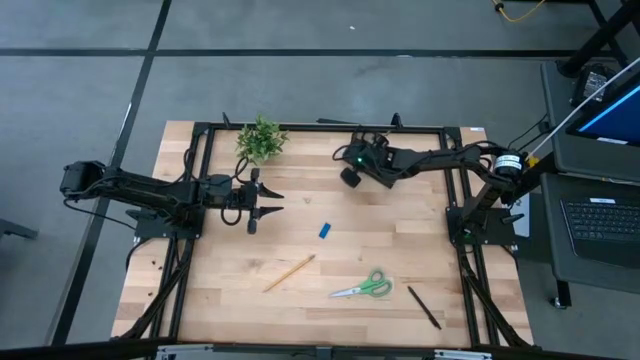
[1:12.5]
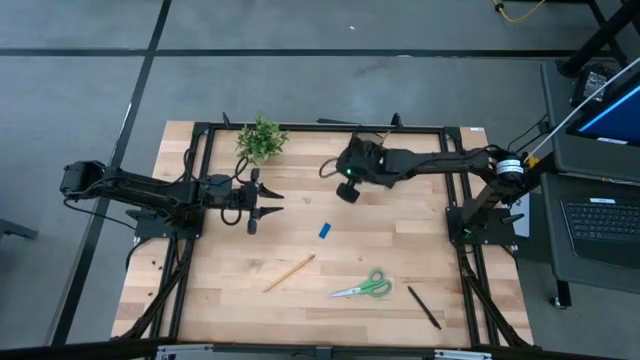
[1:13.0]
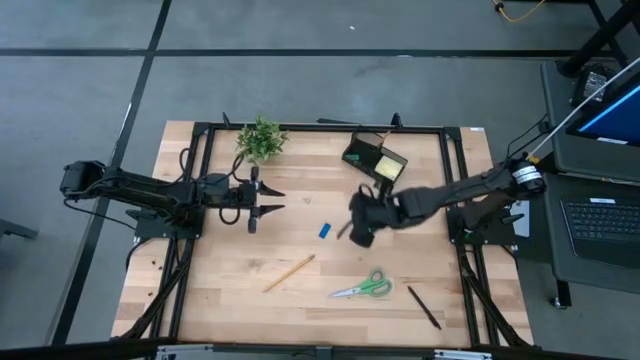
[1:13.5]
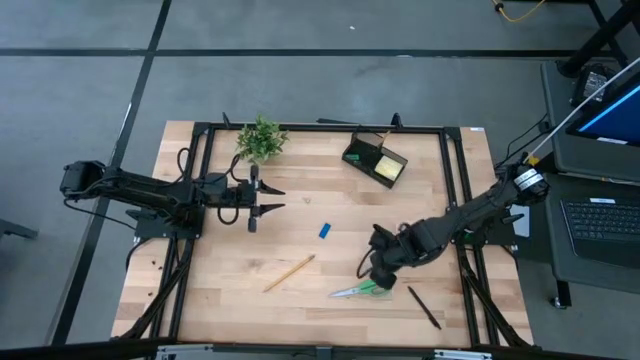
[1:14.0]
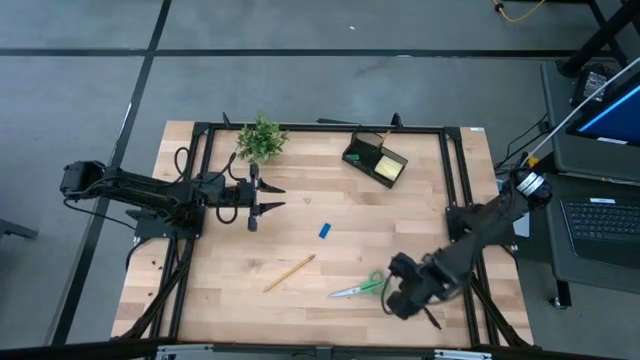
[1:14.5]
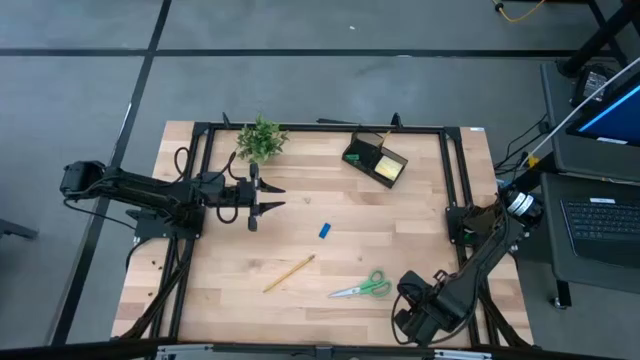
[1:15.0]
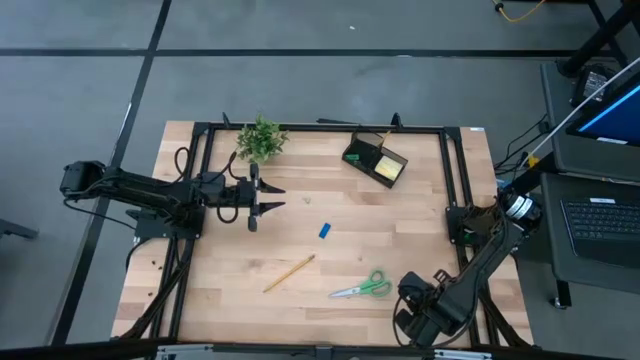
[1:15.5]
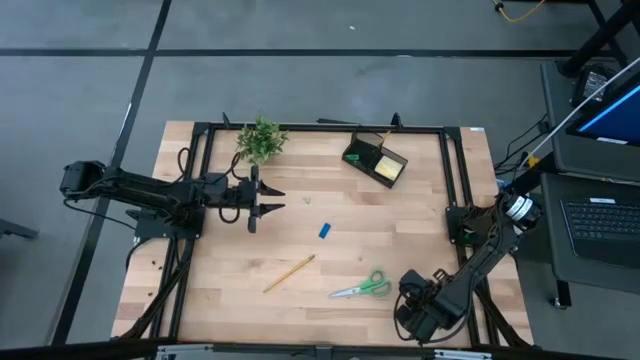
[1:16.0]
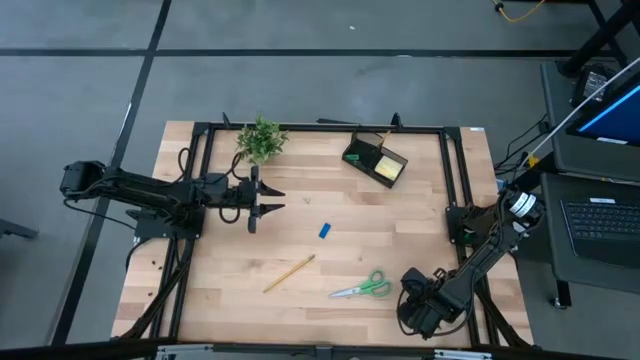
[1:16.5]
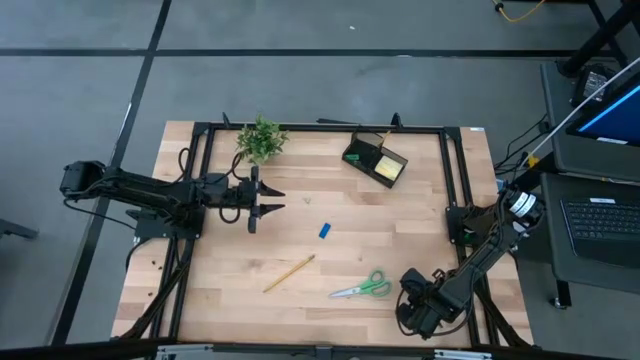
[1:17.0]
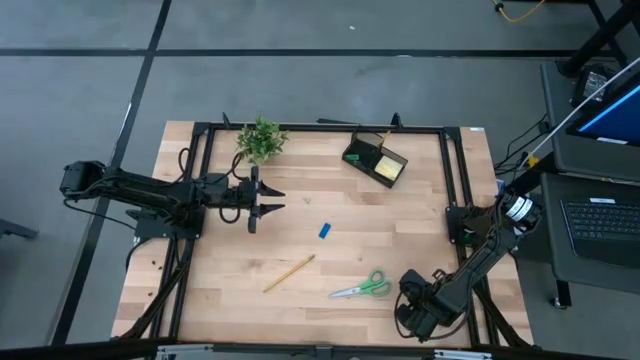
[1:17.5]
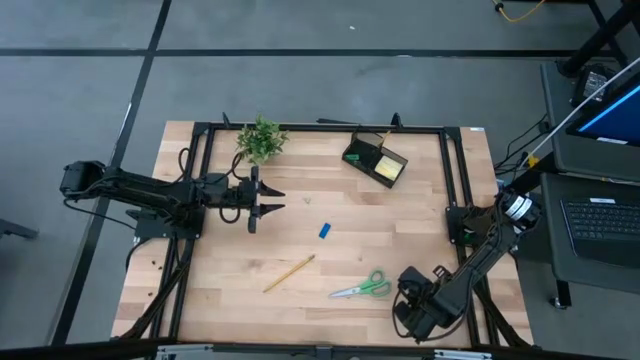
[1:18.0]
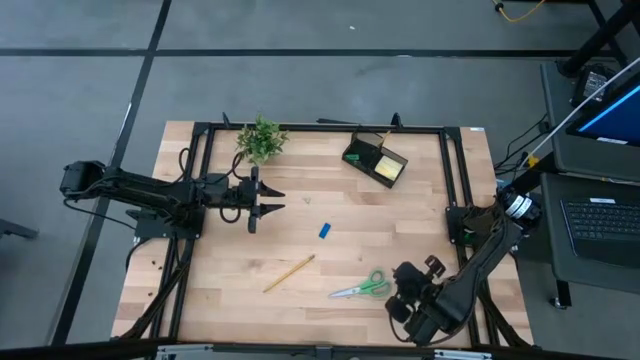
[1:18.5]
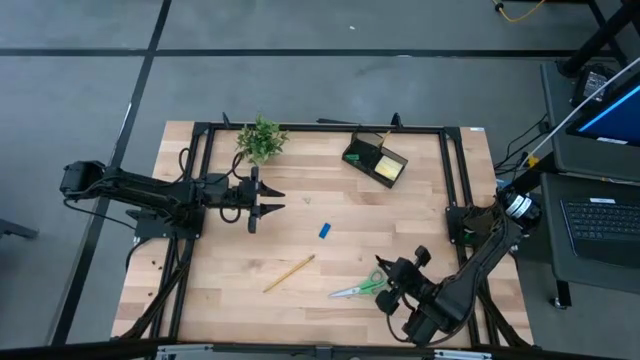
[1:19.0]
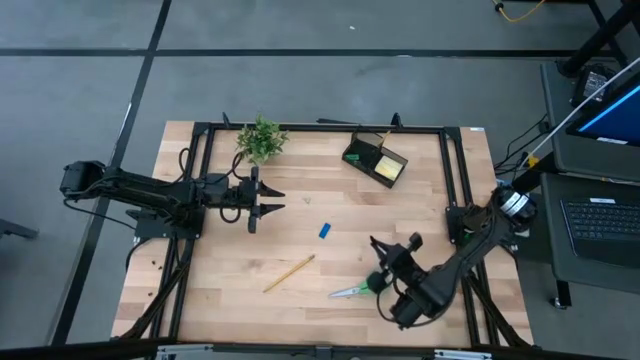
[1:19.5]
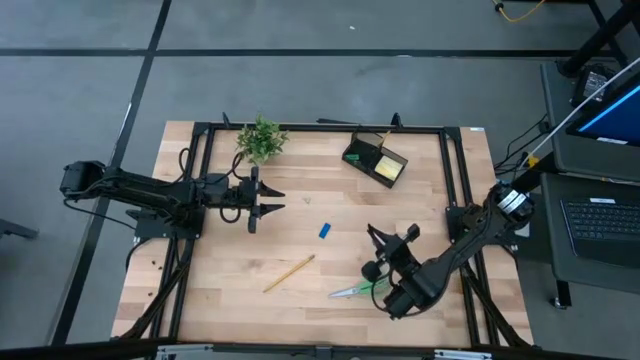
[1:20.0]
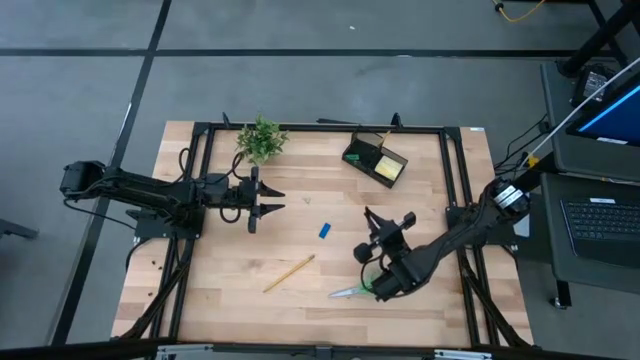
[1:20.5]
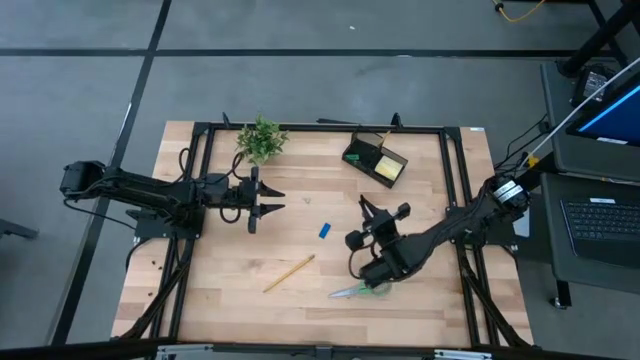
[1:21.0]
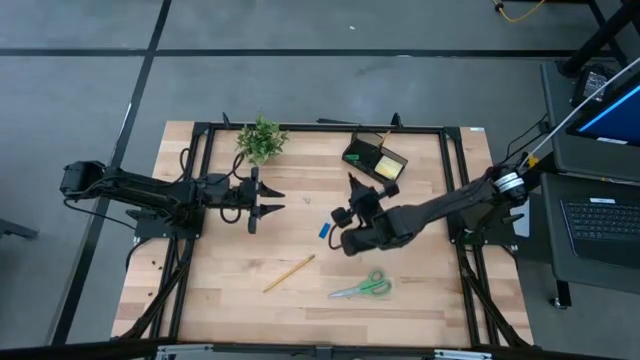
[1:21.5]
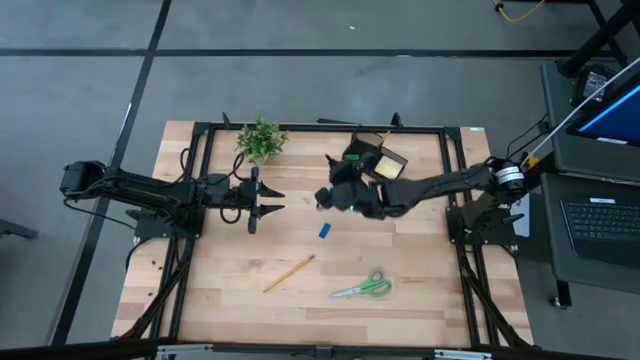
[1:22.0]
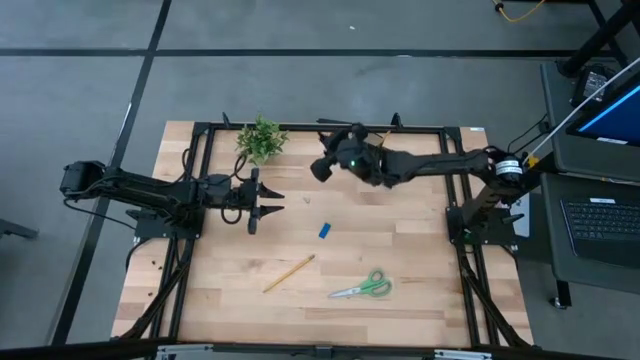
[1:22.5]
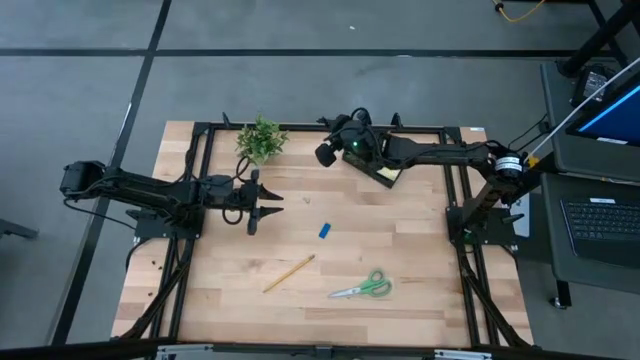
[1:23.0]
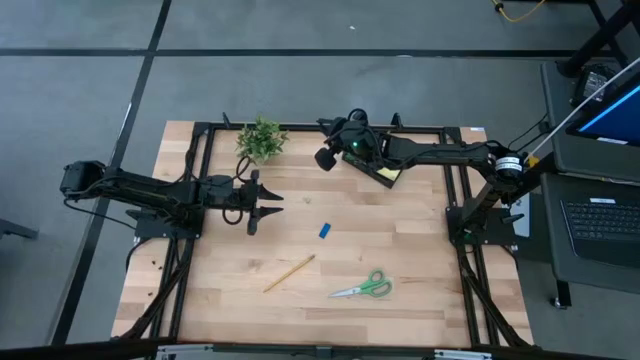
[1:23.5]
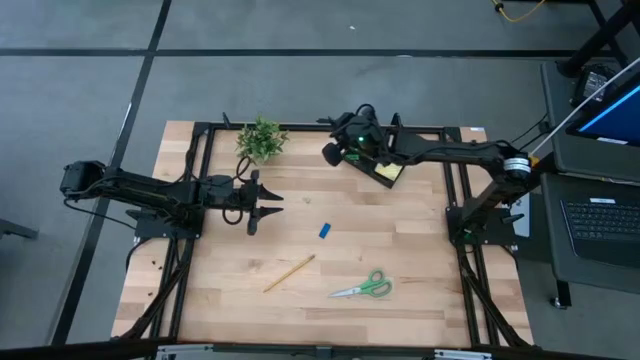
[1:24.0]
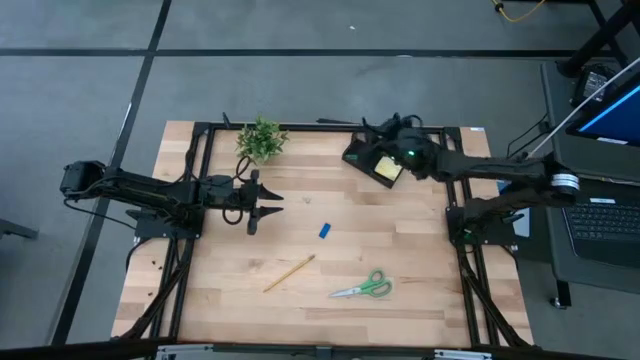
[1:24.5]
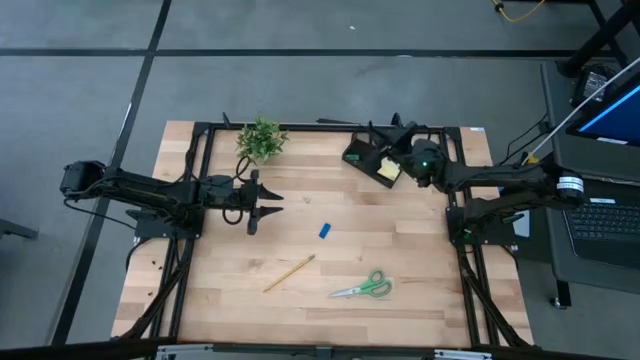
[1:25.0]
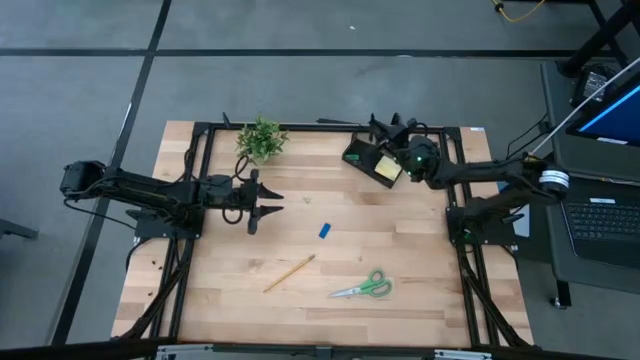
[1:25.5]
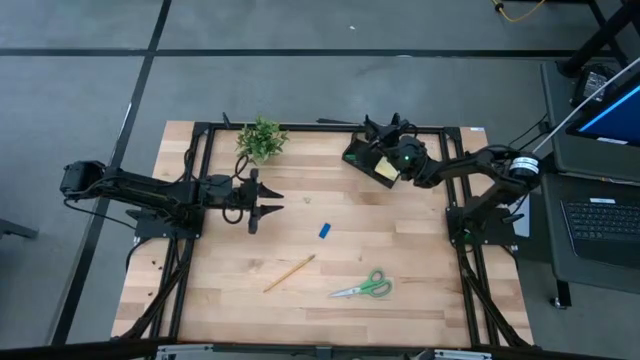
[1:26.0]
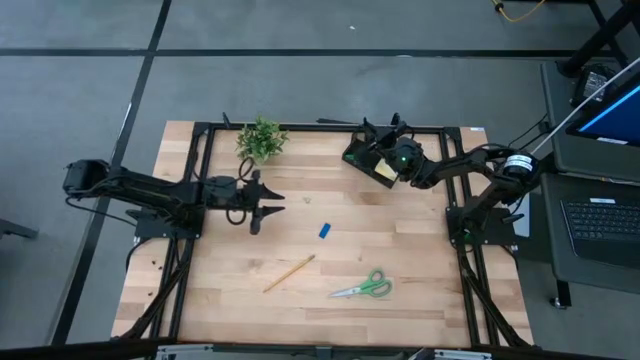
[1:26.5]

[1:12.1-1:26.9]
Task: Pick and place office supplies into organizer
Put the black pen into the black desk organizer

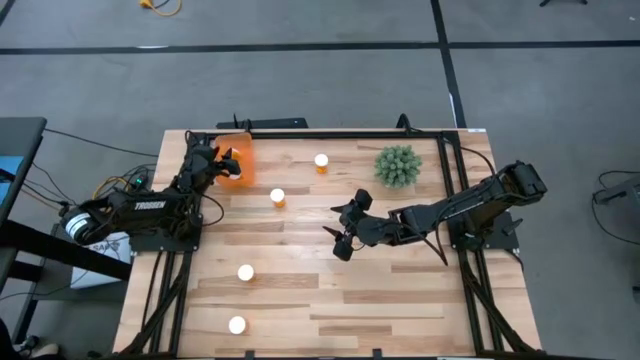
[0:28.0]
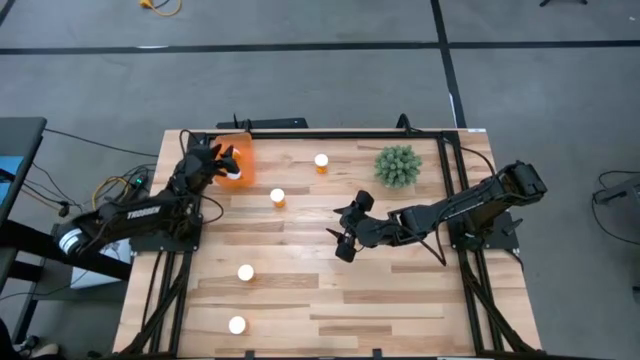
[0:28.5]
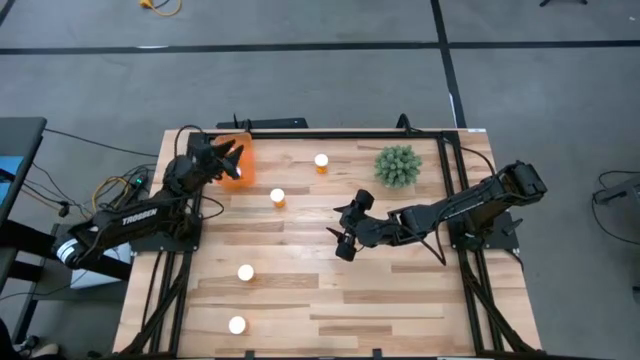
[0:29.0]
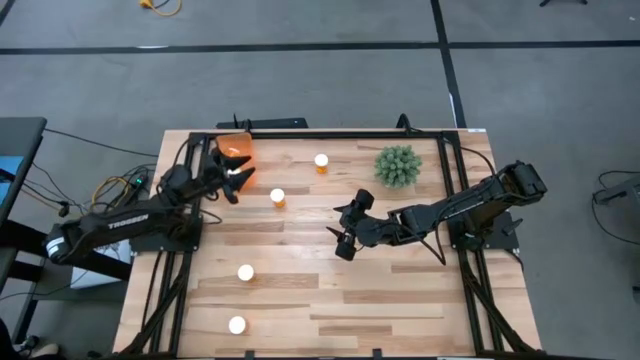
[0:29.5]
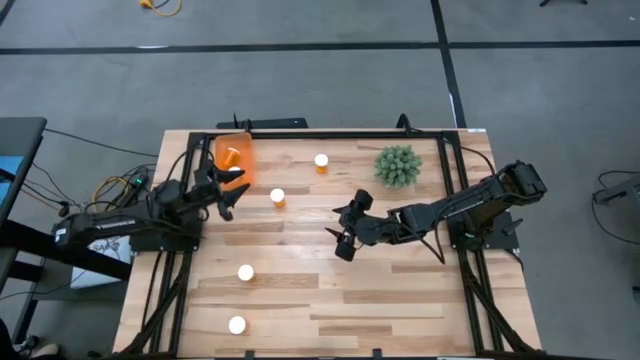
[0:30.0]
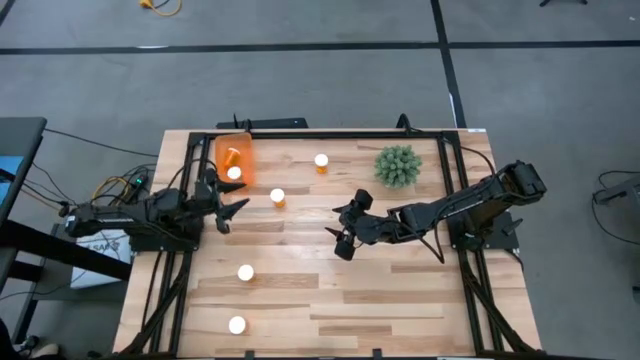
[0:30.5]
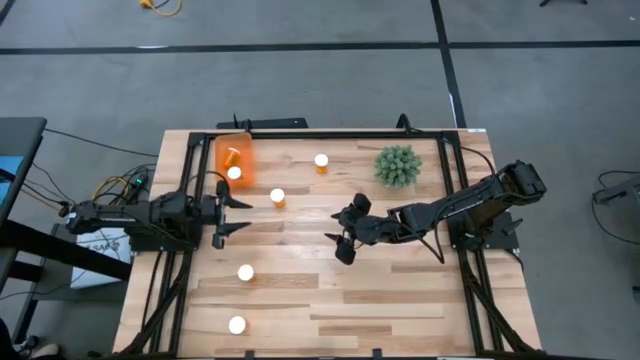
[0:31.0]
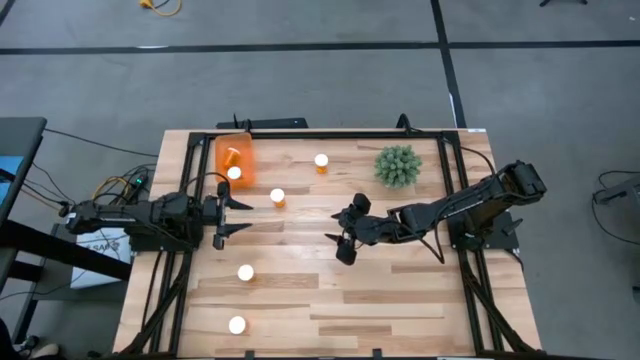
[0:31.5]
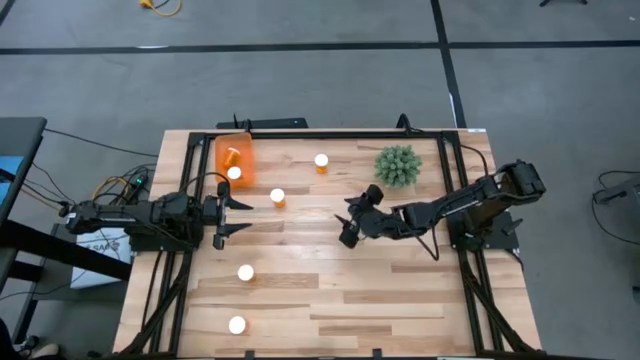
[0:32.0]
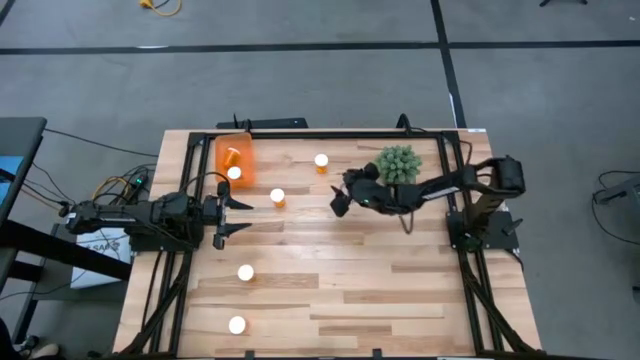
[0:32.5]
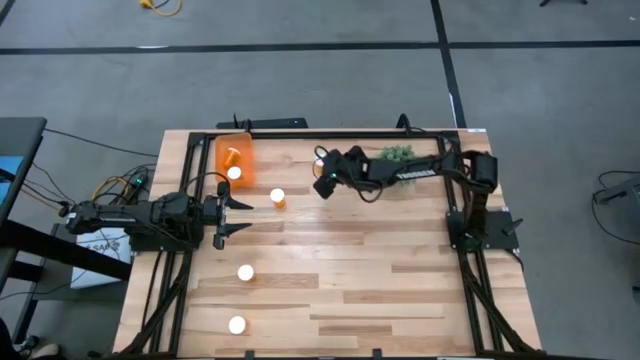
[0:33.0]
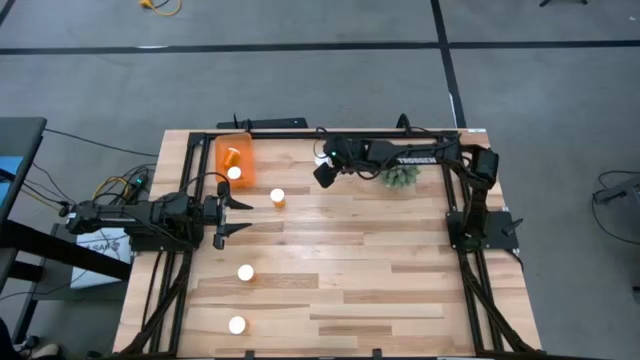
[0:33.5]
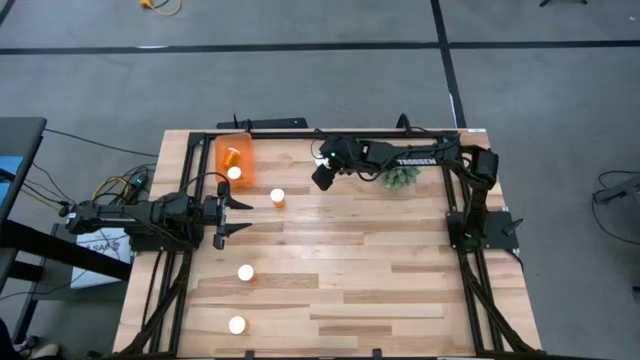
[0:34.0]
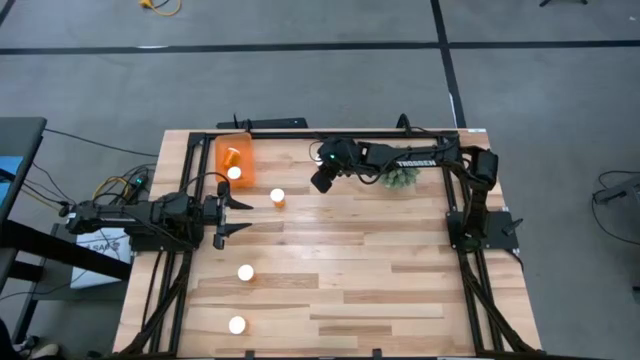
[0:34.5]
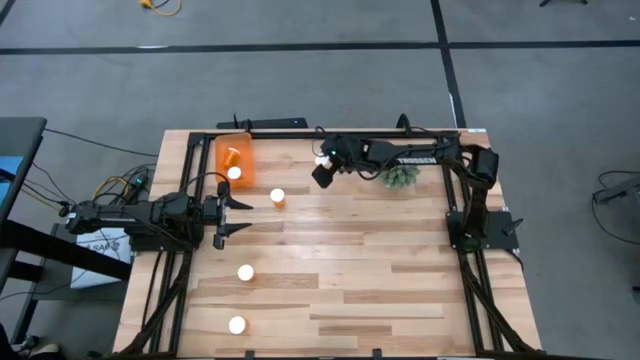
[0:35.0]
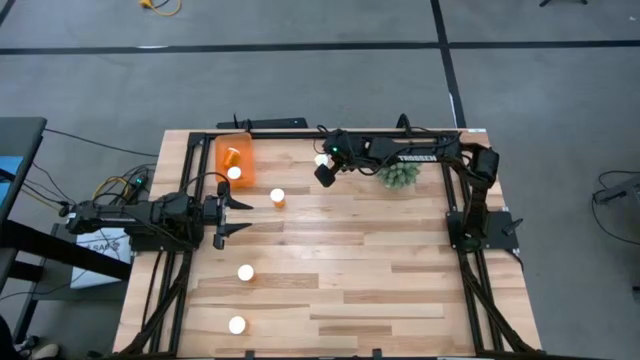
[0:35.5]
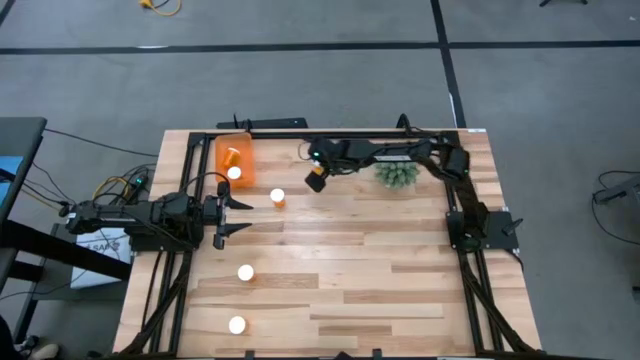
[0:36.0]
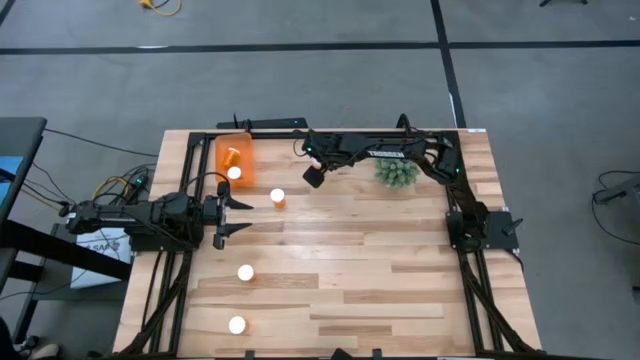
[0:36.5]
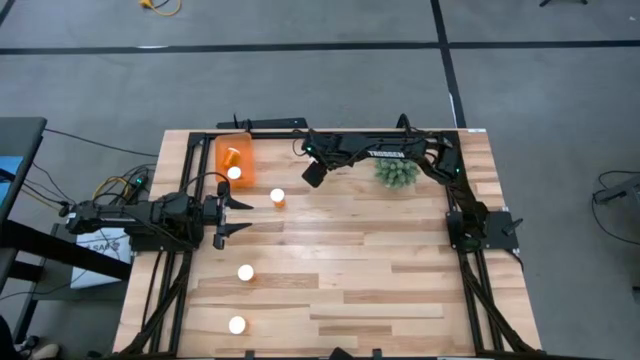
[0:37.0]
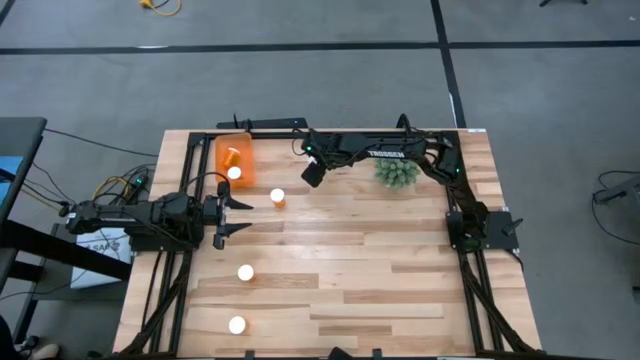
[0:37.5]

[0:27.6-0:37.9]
Task: Pick and place pill bottles into a basket
Put the orange pill bottle into the orange container
